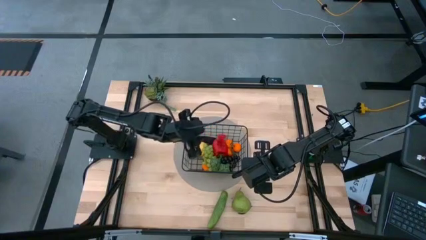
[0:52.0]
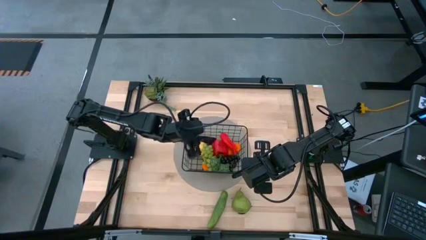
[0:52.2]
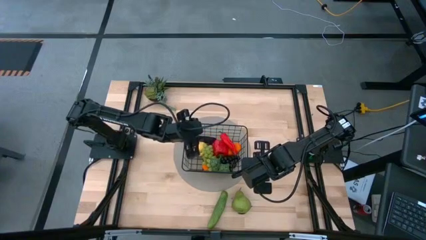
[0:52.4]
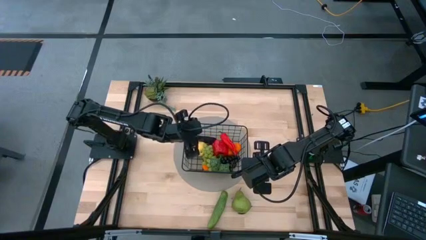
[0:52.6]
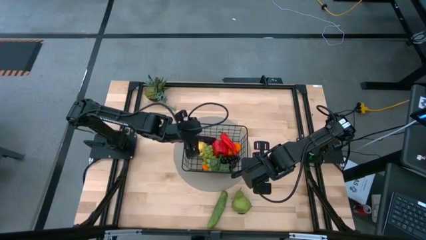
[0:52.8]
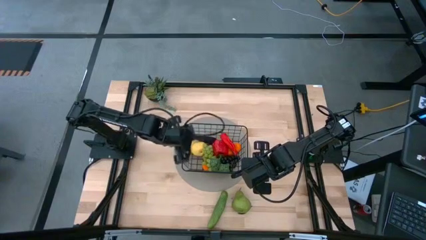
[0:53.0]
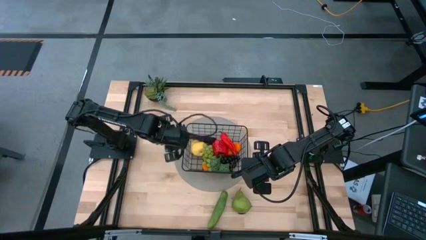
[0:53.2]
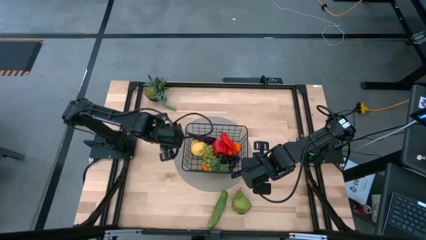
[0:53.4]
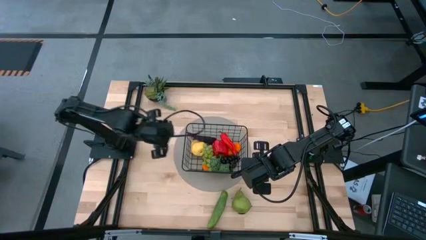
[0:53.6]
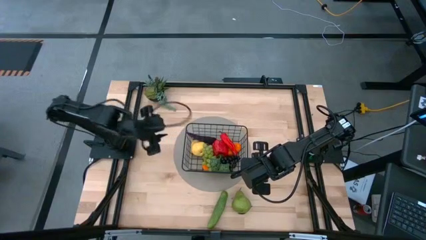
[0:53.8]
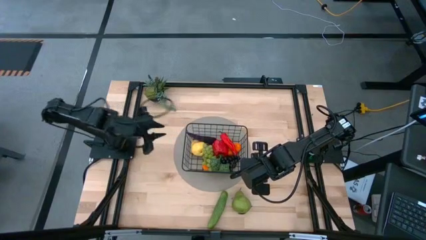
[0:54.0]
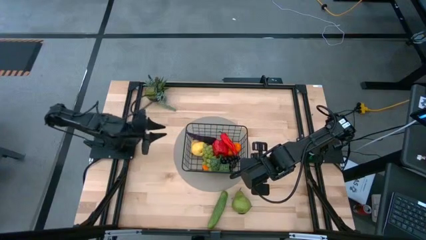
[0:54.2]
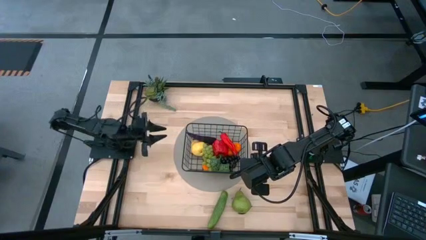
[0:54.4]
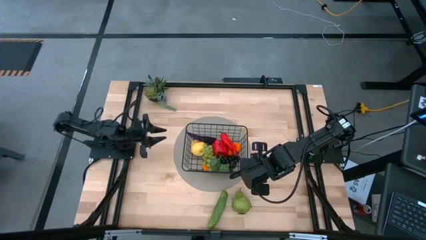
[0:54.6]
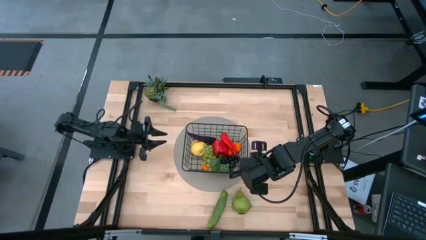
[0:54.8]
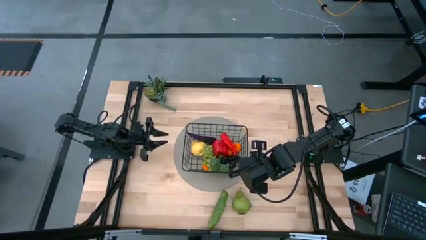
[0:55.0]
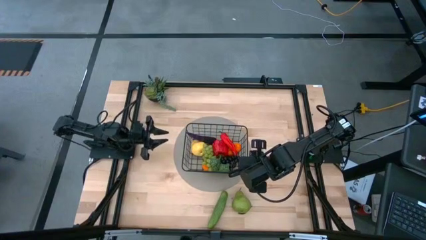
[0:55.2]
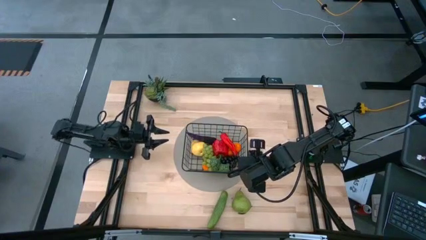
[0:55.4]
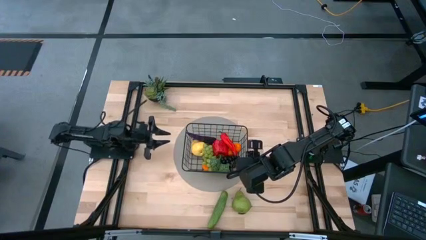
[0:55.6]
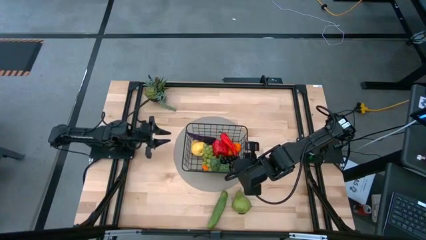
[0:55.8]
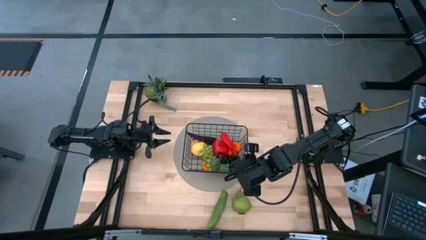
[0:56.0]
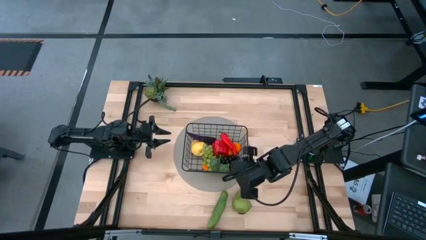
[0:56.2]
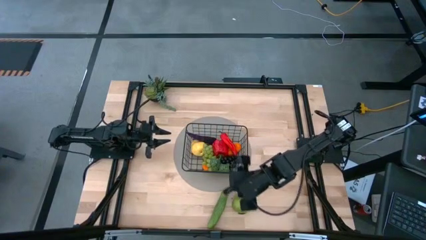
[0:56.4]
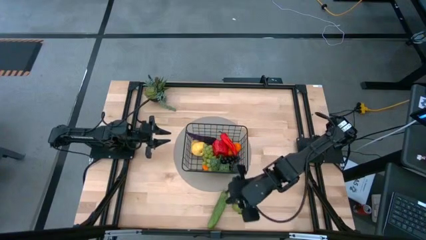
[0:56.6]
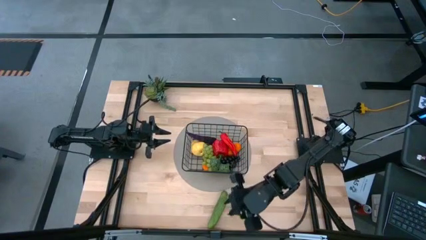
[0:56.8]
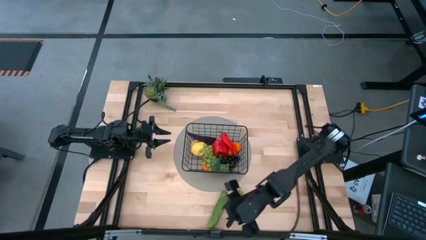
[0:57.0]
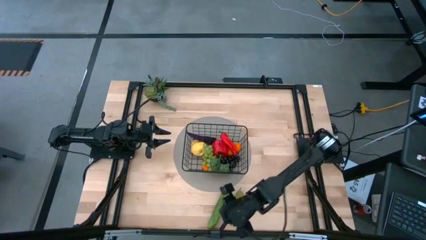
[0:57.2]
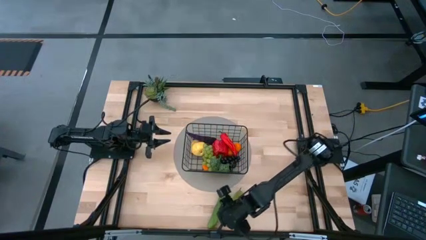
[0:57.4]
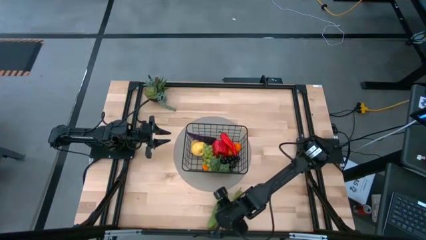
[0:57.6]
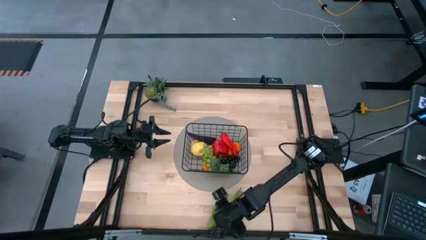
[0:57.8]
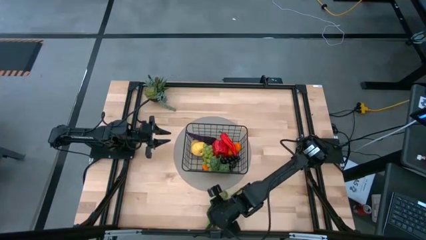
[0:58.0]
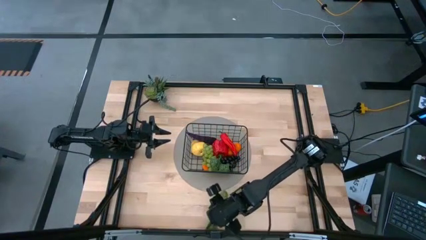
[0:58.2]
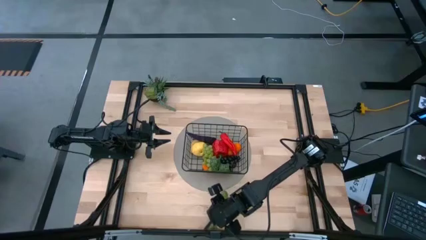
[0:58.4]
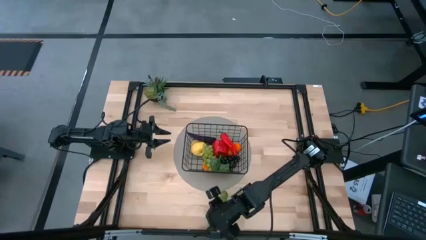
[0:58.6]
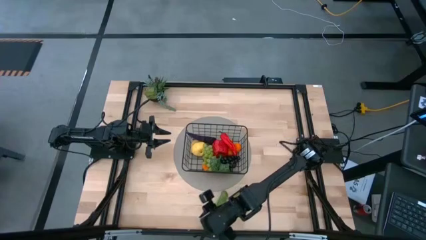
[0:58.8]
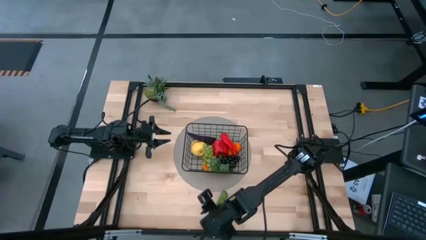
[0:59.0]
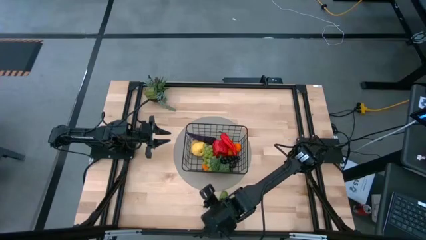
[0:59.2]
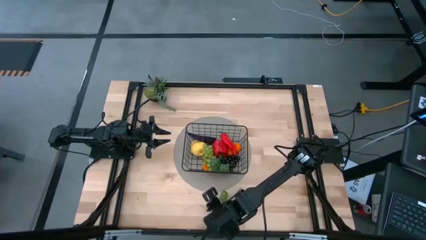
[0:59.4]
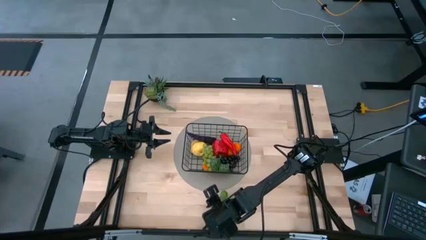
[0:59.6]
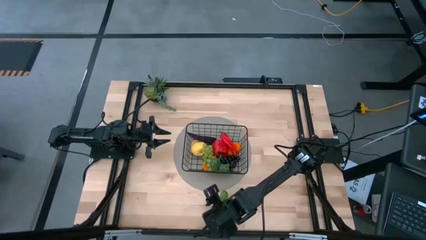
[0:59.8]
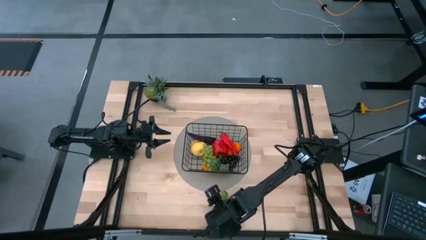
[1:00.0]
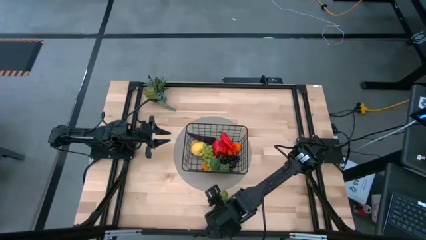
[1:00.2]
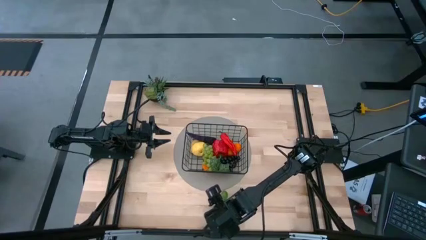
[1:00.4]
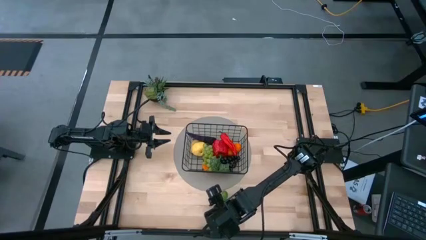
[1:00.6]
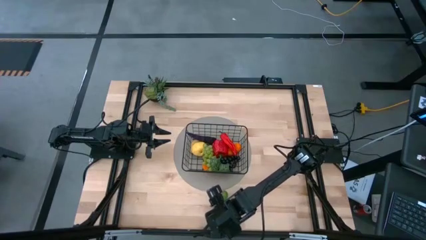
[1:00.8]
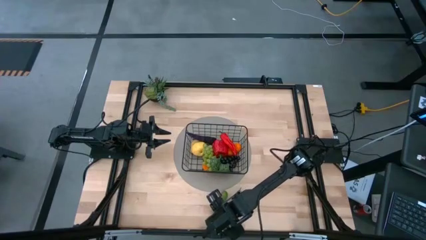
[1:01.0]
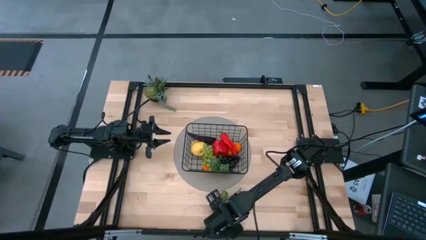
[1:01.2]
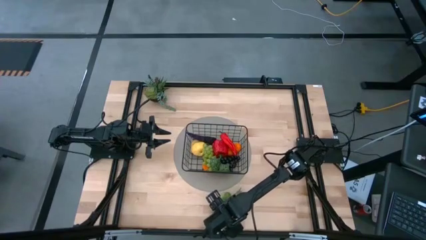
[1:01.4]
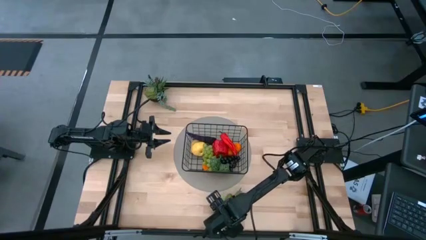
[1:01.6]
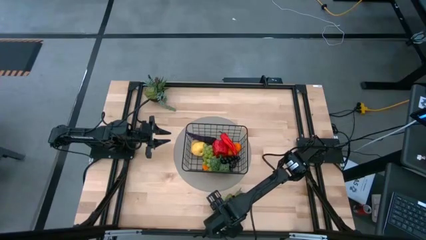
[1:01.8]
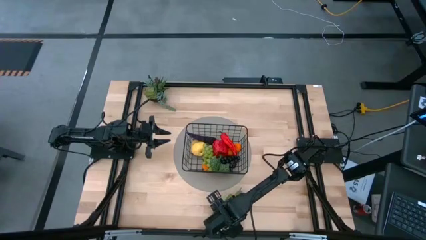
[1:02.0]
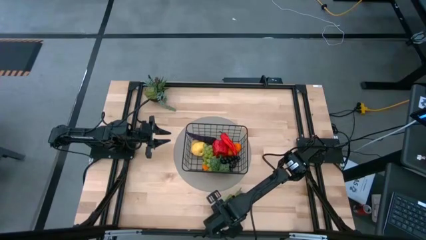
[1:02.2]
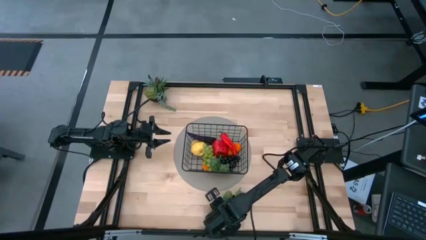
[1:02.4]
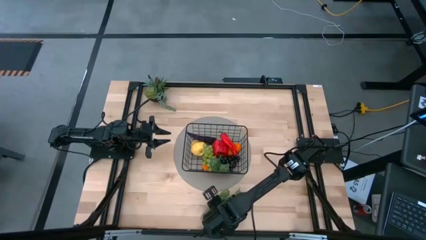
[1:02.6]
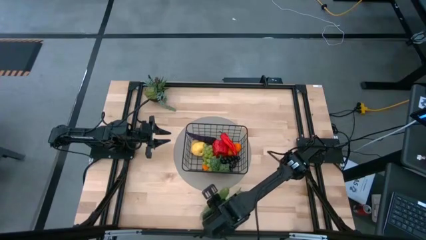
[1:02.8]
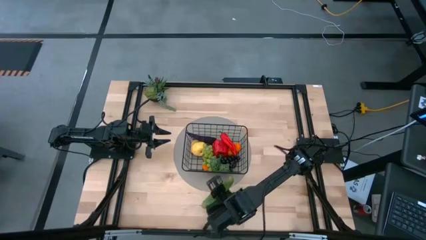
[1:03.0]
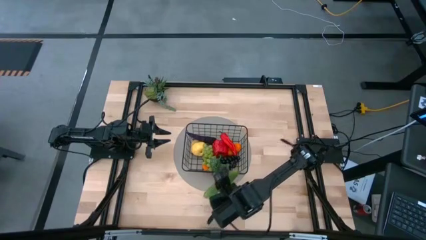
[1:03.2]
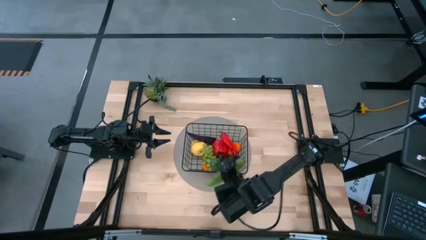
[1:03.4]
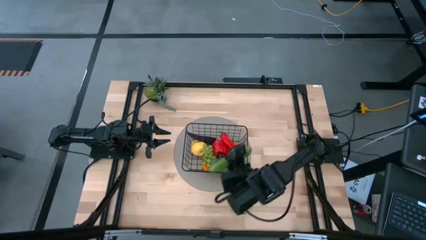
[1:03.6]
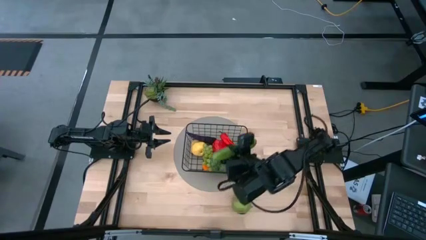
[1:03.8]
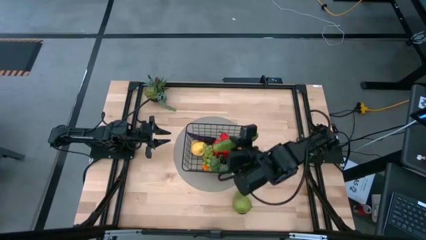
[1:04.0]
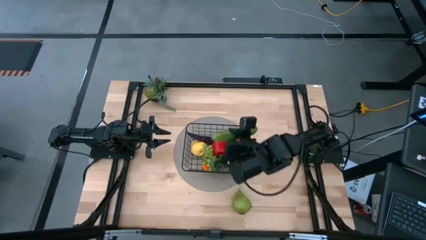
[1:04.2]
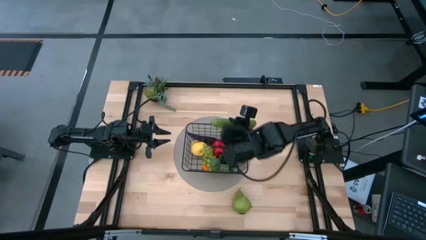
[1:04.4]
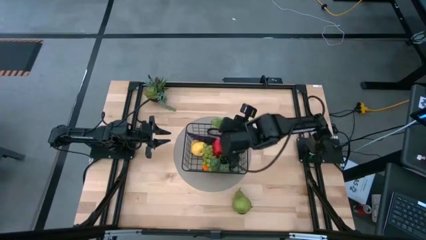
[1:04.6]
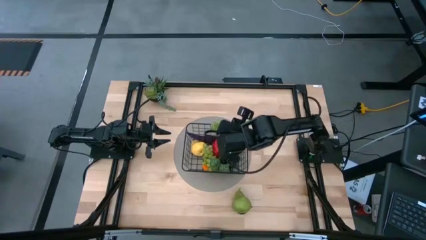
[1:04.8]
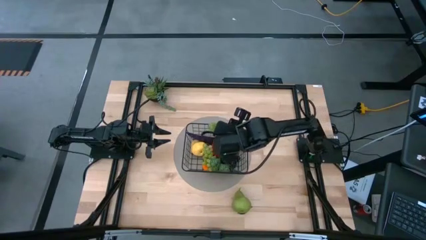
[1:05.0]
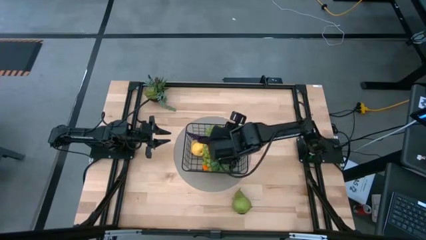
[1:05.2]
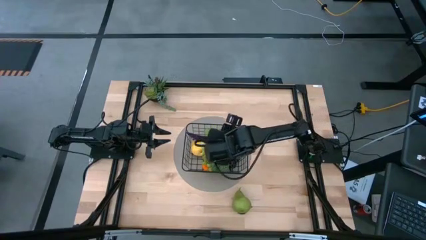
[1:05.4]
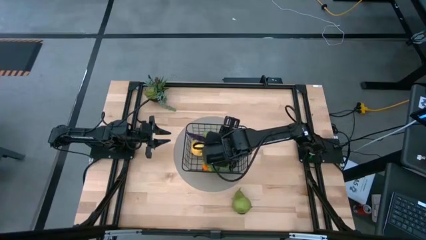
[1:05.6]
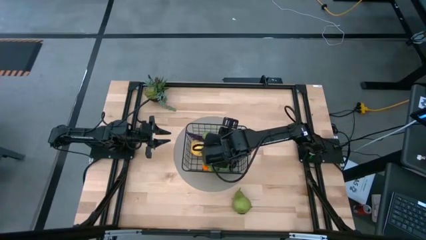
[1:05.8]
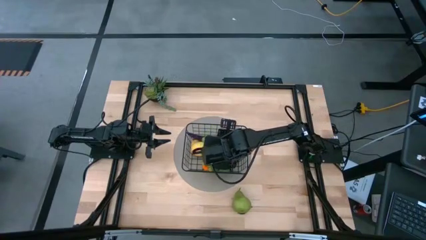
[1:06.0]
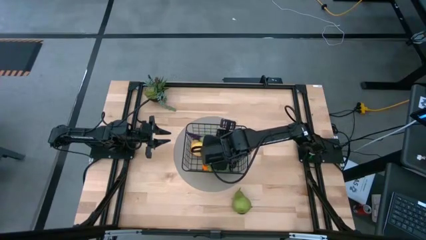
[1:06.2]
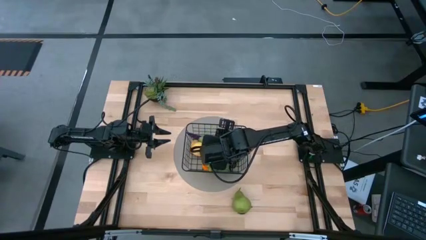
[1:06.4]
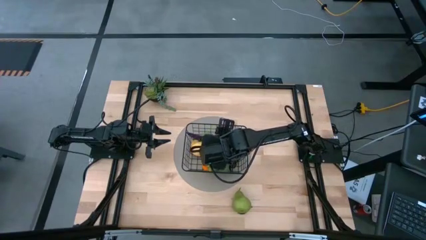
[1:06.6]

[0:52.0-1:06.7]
Task: Build produce basket
Put the green cucumber into the black wire basket
